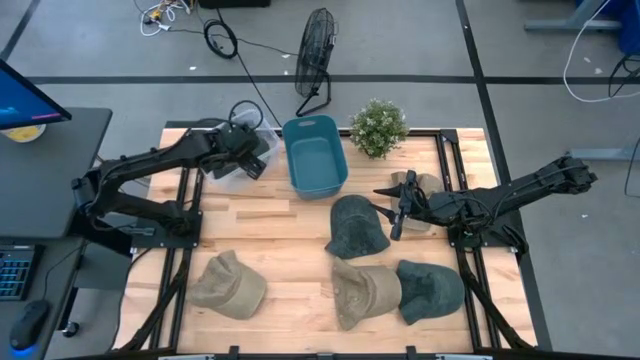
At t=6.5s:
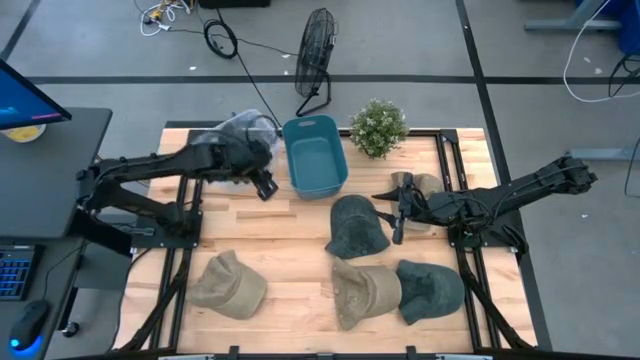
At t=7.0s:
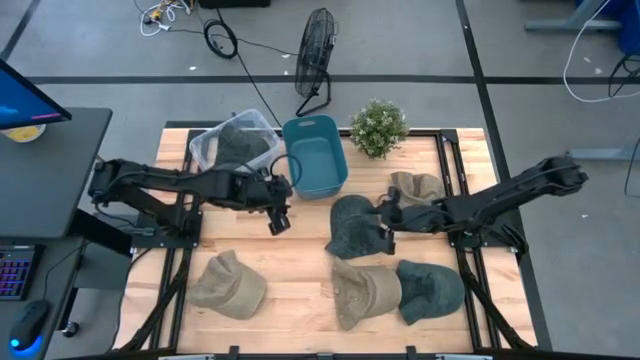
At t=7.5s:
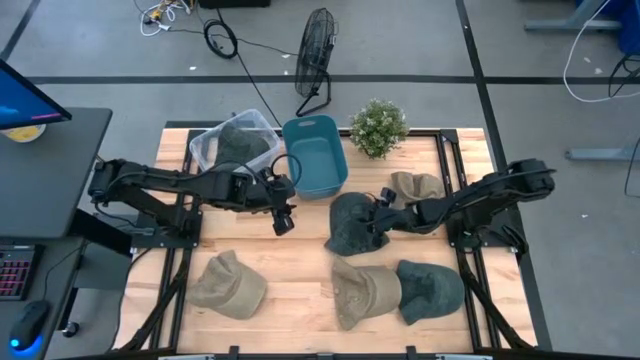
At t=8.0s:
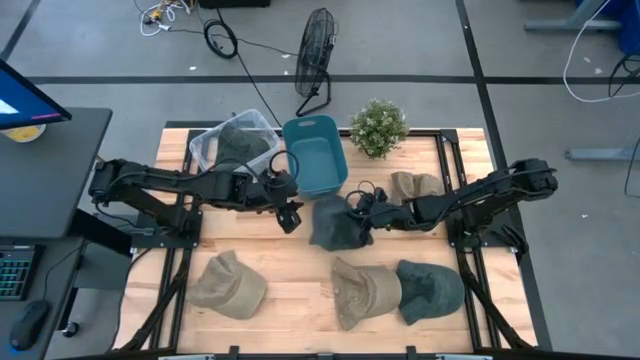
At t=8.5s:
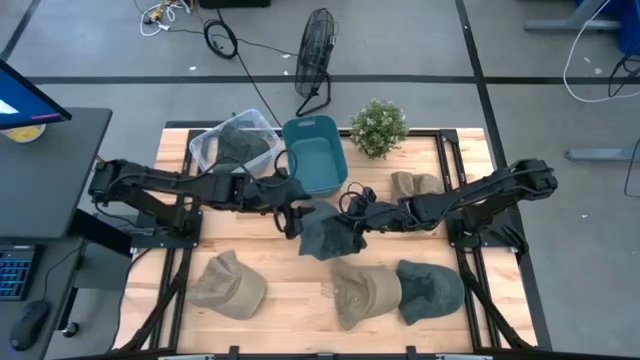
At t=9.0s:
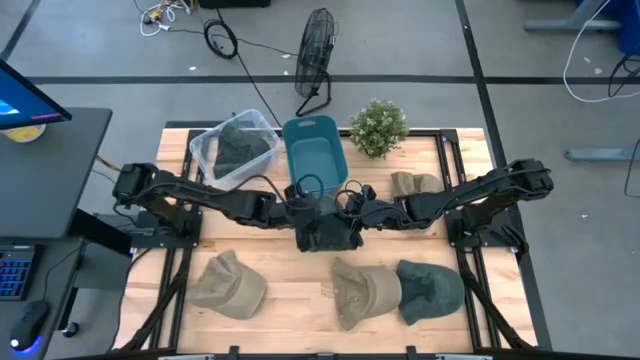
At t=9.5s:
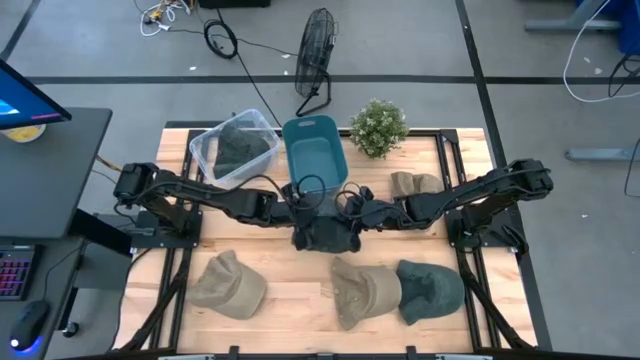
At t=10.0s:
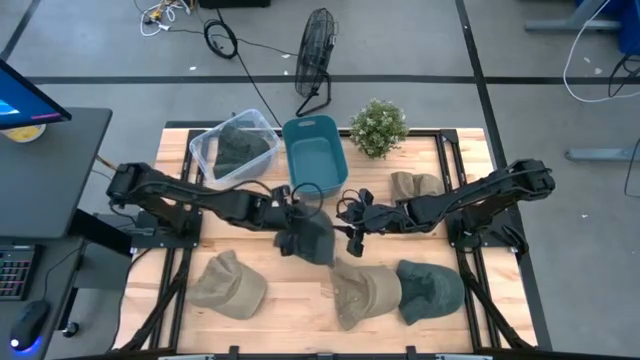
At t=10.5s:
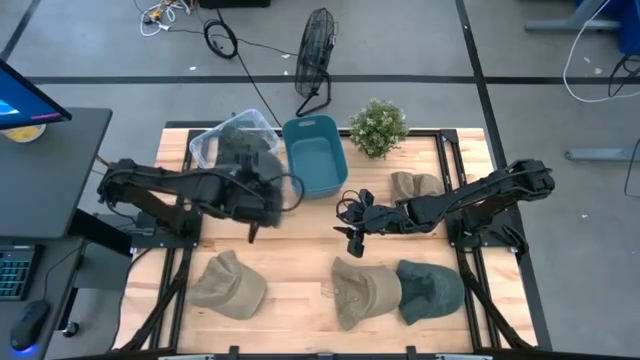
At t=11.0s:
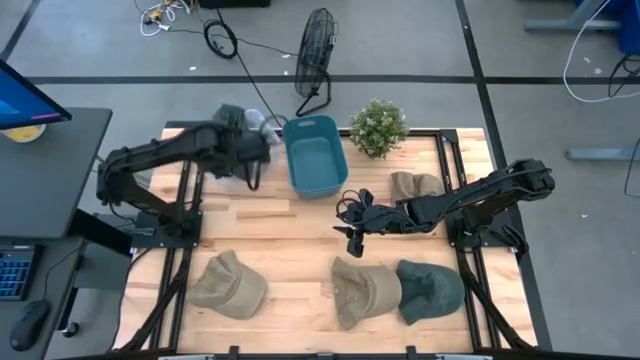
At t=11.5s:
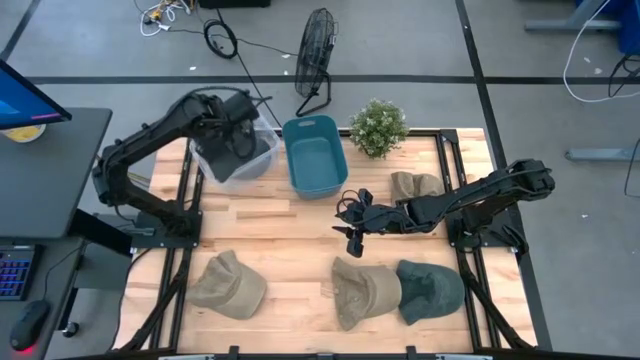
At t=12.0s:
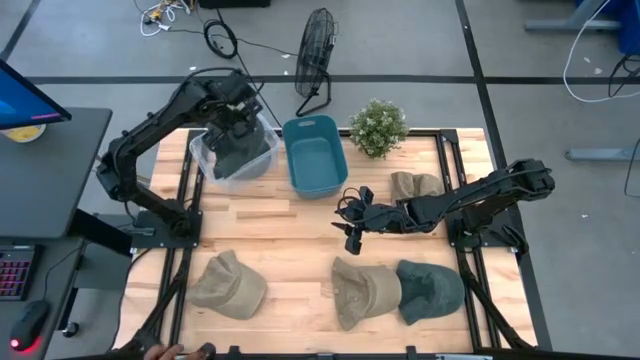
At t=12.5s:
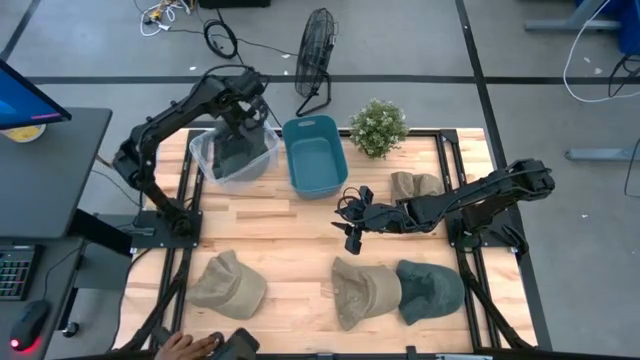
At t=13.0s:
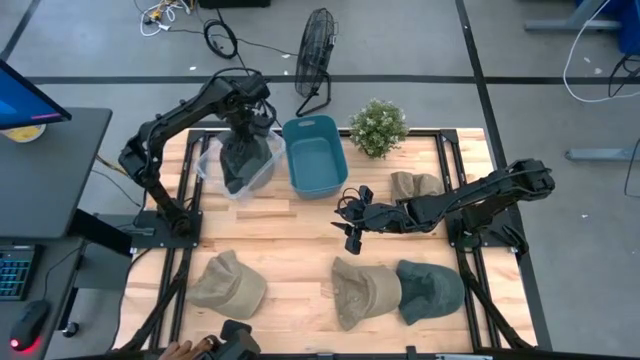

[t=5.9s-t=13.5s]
Task: Pick & Place hat
Put the left blue cap into the transparent bin

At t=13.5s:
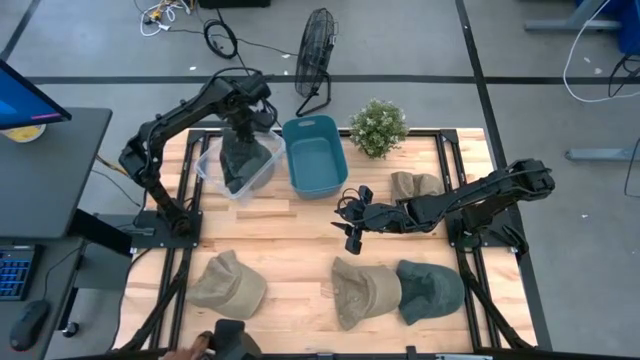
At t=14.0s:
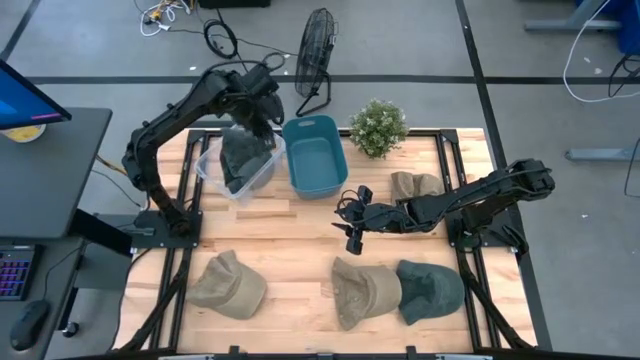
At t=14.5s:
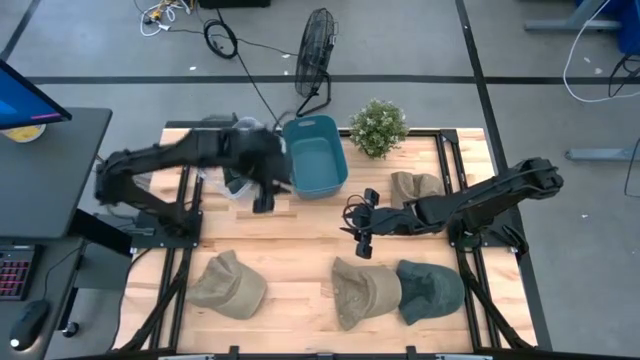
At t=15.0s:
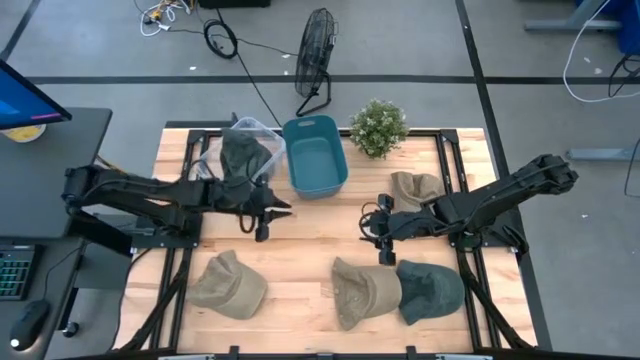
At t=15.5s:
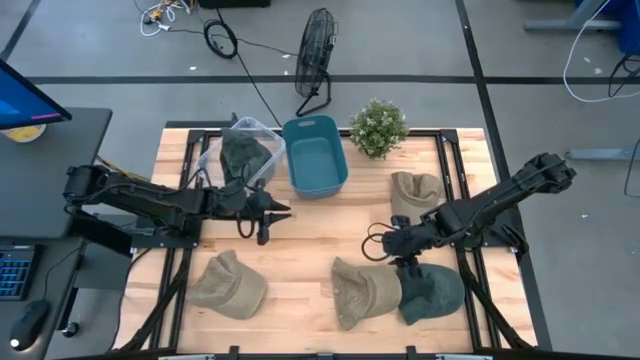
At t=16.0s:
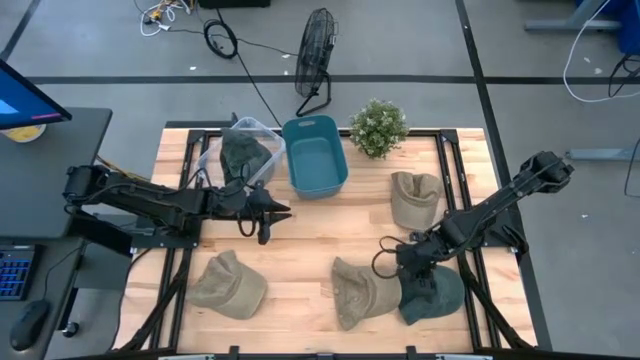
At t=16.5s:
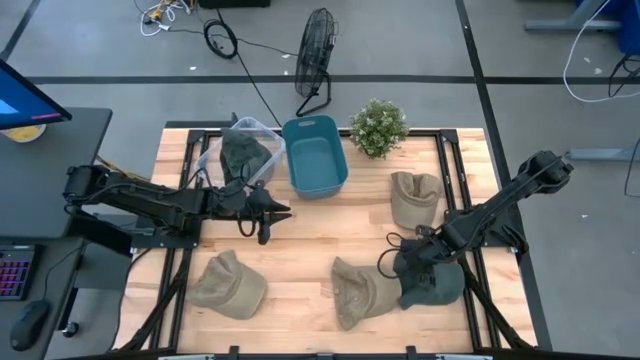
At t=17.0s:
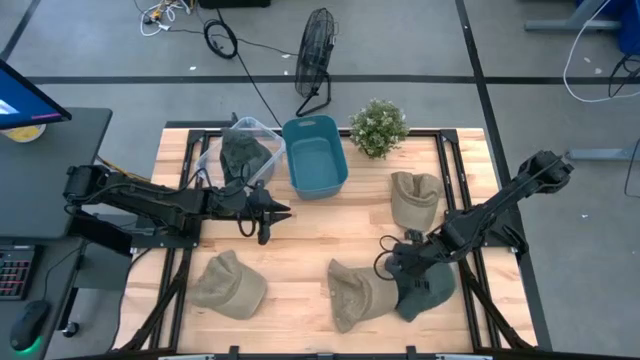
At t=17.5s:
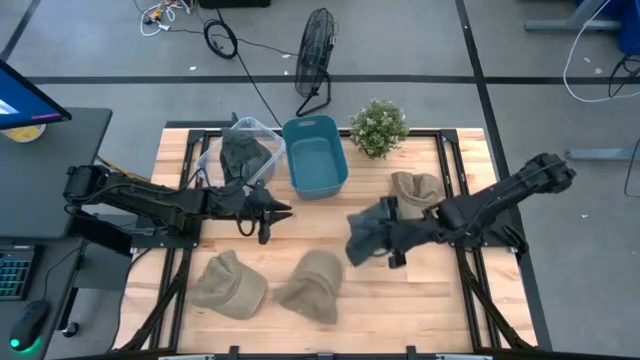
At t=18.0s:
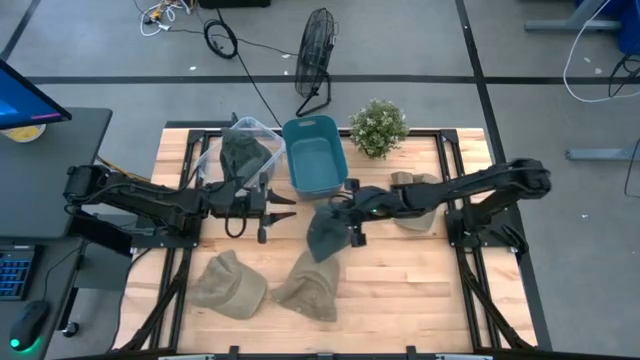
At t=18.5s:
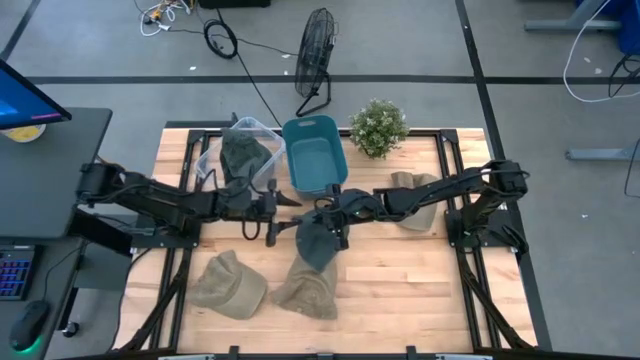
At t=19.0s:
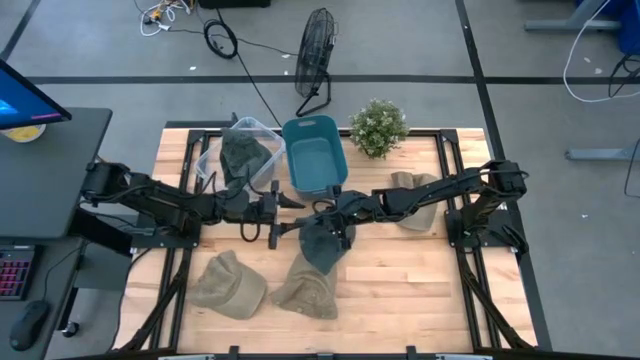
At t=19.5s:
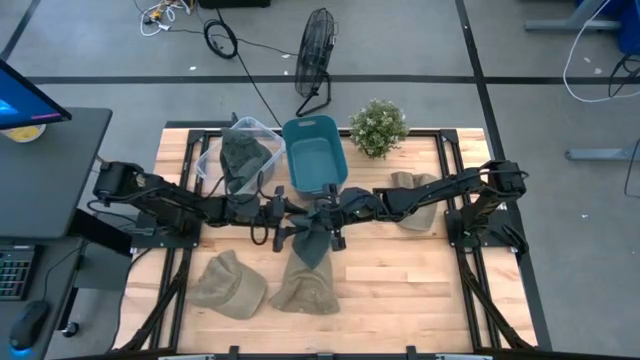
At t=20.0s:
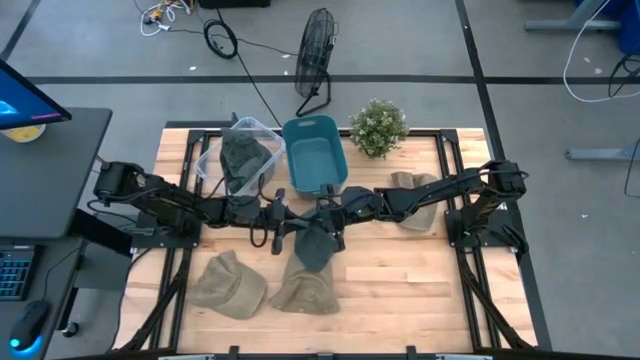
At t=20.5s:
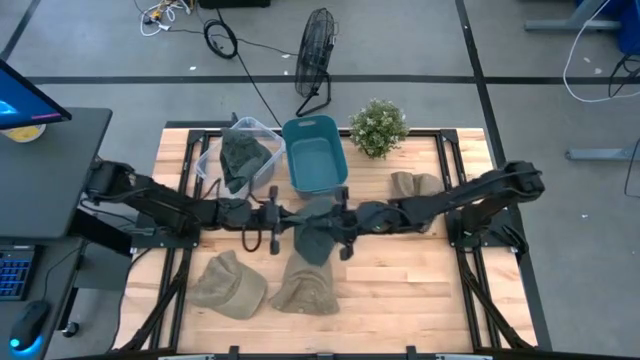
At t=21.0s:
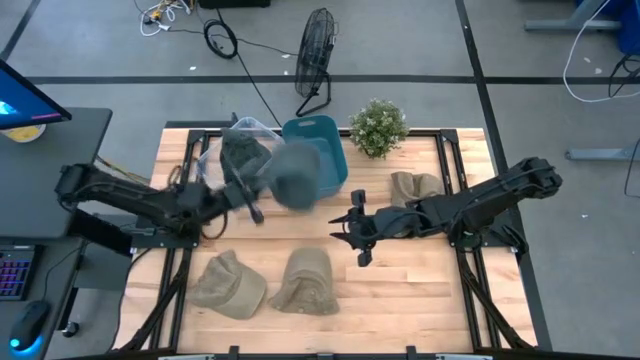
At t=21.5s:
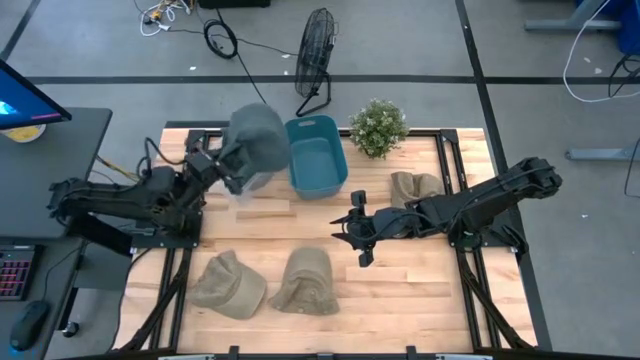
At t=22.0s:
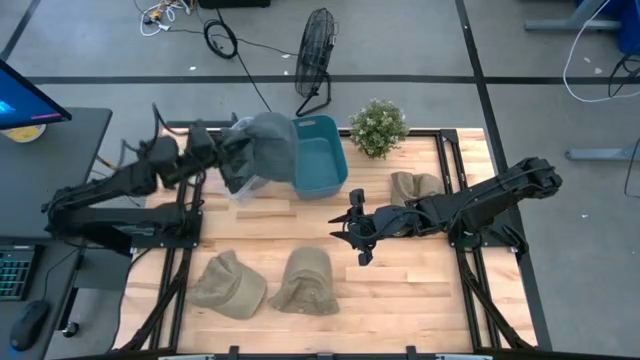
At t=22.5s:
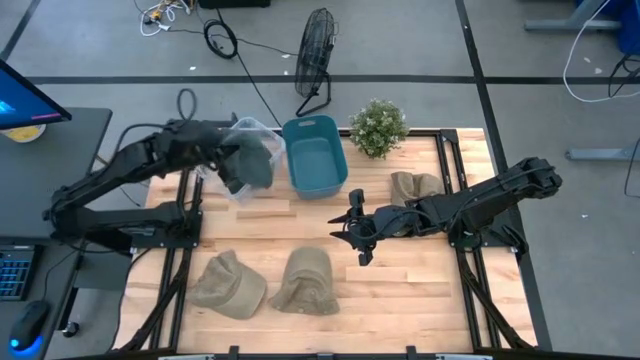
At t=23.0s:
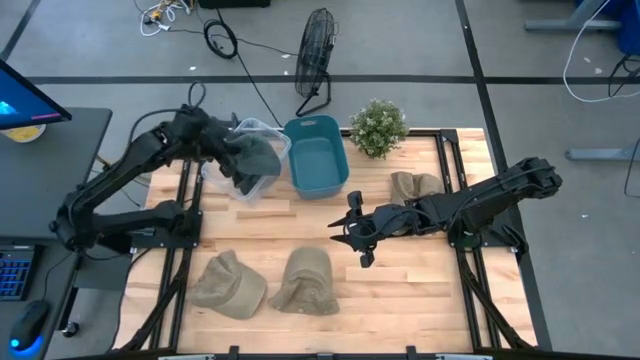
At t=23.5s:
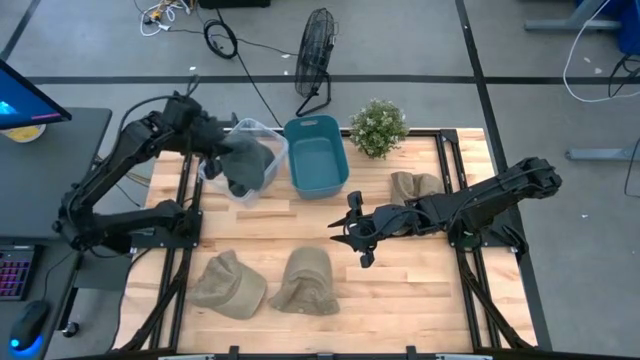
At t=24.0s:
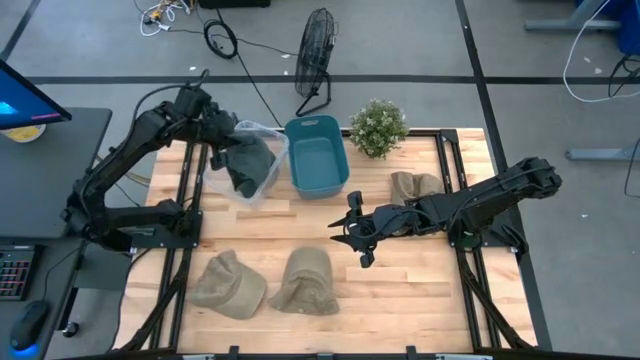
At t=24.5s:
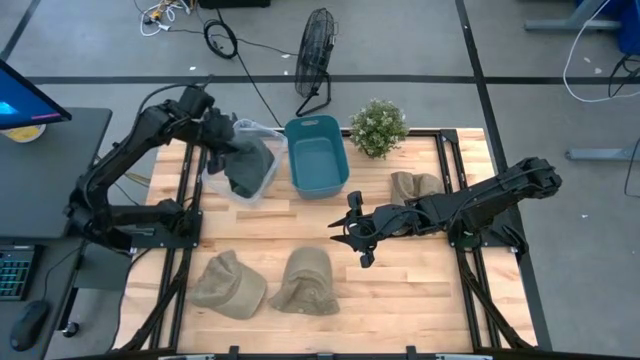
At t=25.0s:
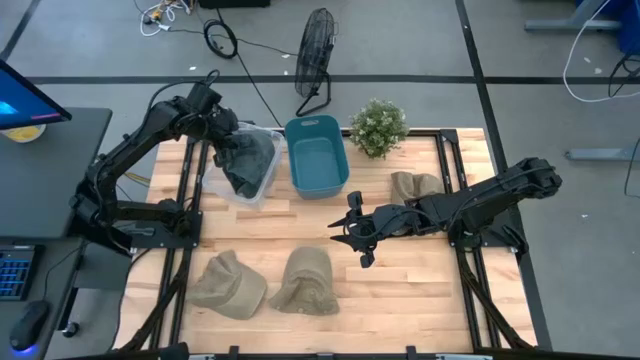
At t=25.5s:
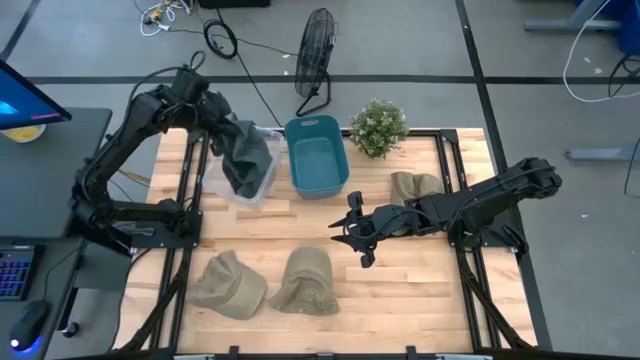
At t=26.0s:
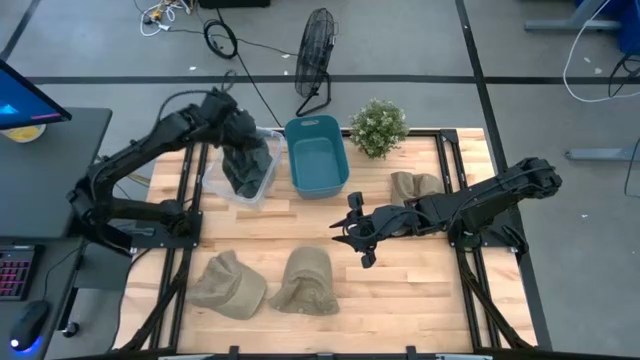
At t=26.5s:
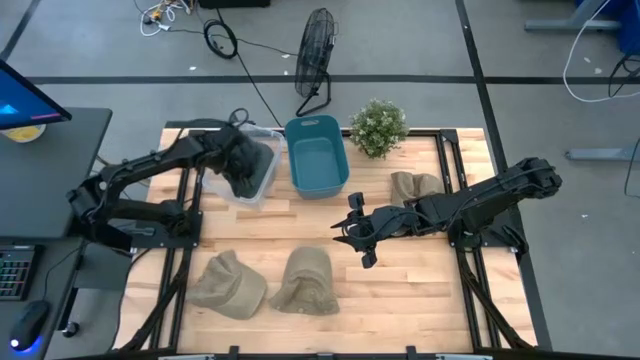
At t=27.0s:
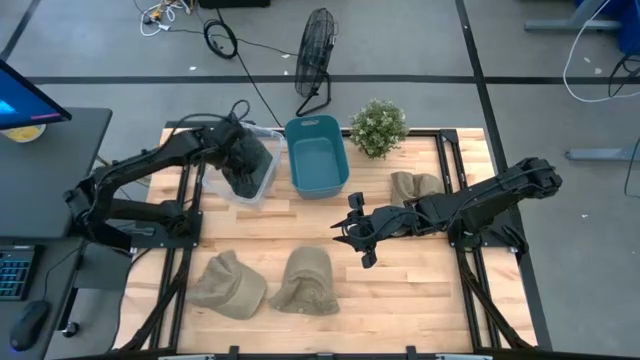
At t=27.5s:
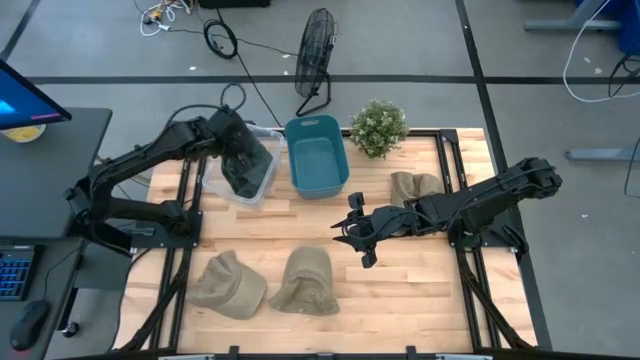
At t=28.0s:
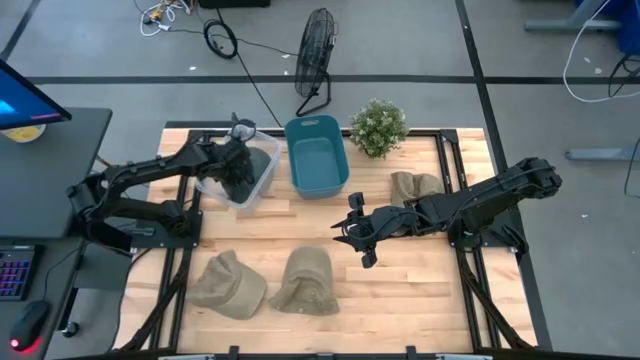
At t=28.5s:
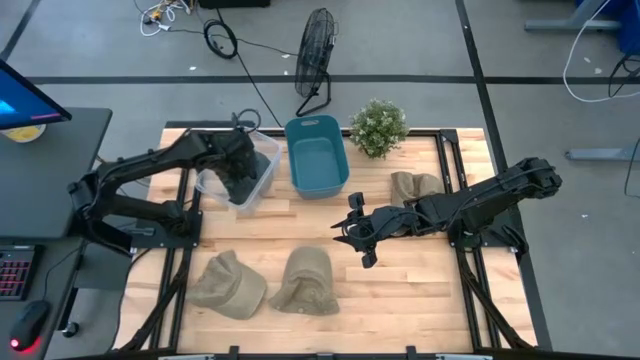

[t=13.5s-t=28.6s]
Put the blue cap into the transparent bin
